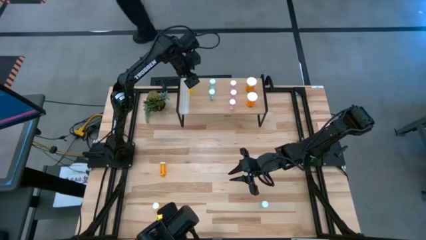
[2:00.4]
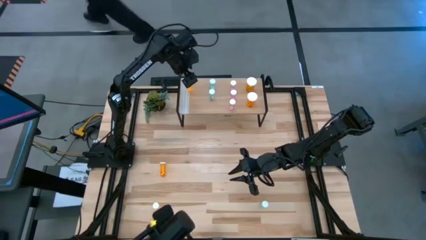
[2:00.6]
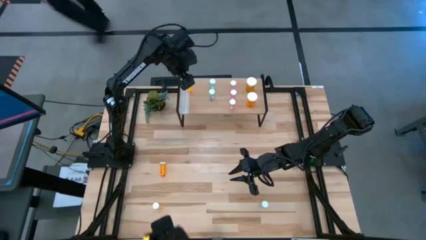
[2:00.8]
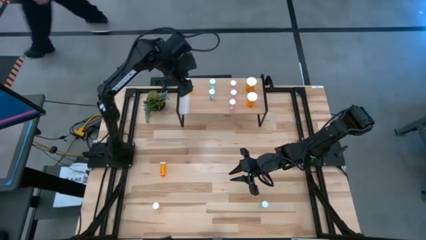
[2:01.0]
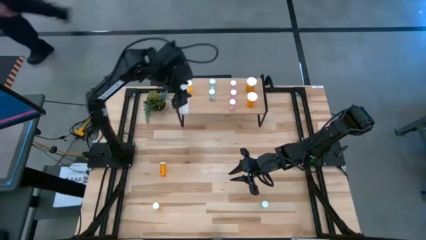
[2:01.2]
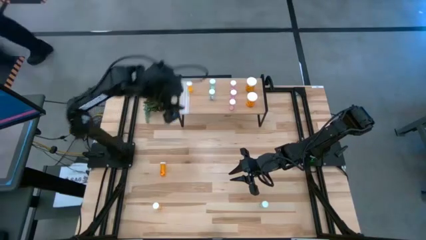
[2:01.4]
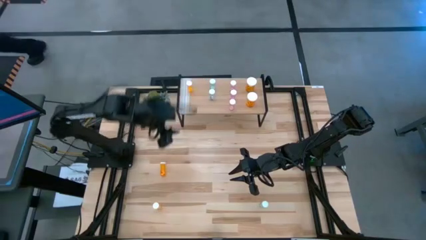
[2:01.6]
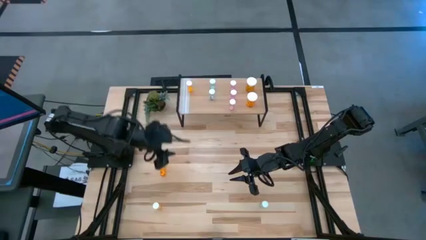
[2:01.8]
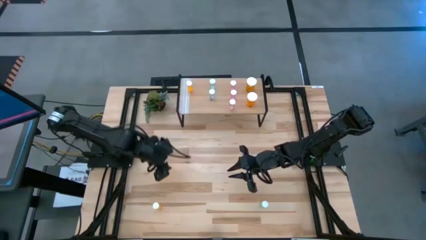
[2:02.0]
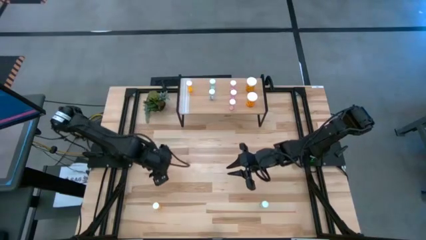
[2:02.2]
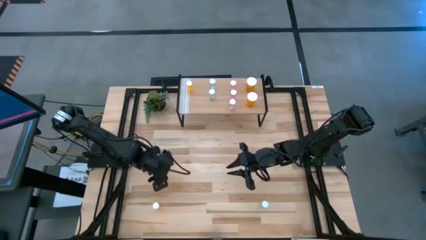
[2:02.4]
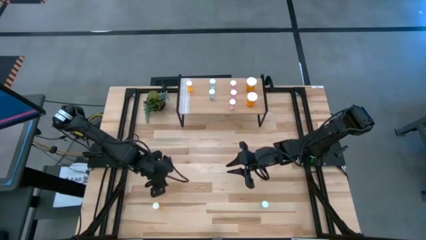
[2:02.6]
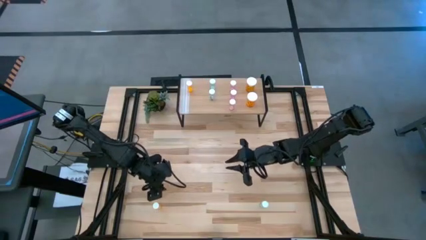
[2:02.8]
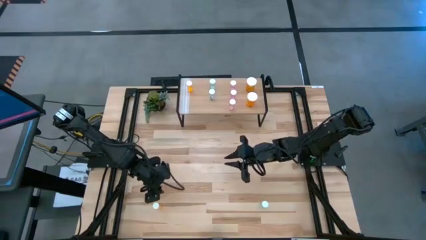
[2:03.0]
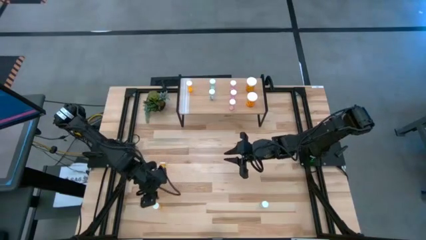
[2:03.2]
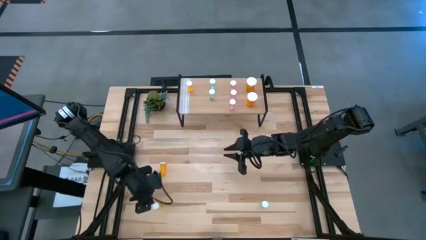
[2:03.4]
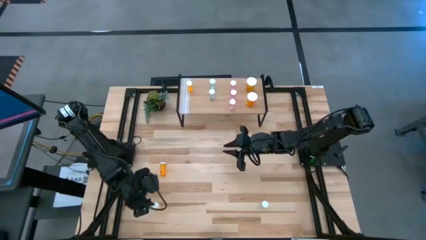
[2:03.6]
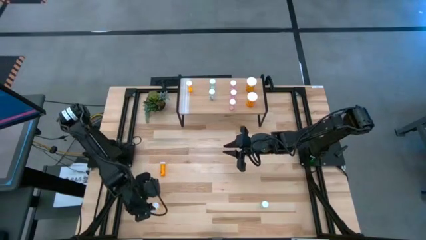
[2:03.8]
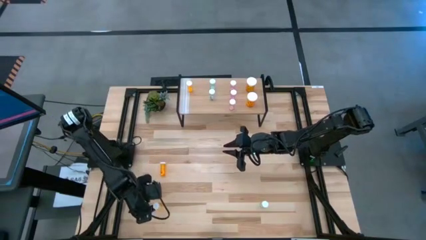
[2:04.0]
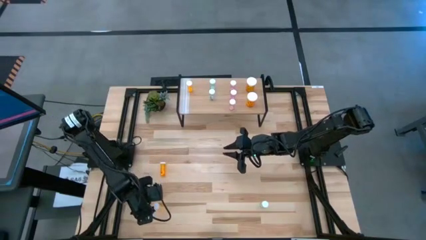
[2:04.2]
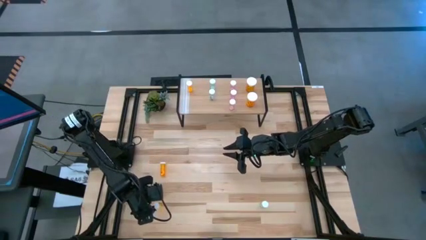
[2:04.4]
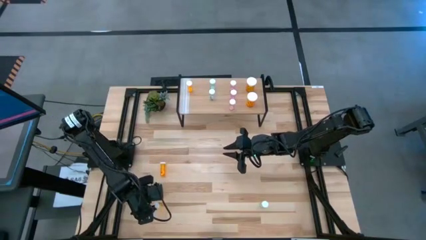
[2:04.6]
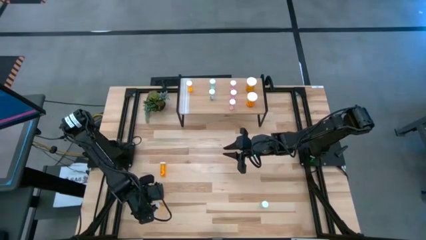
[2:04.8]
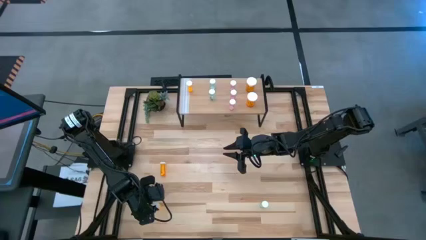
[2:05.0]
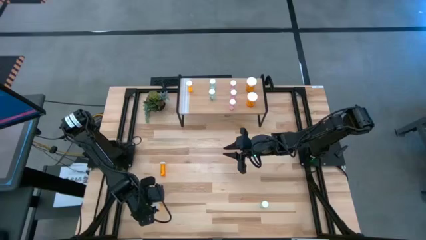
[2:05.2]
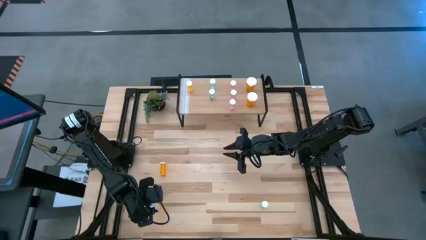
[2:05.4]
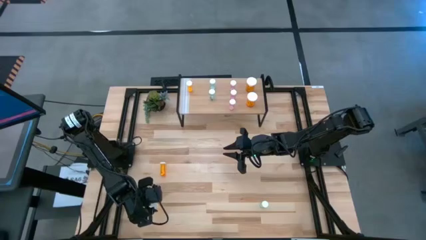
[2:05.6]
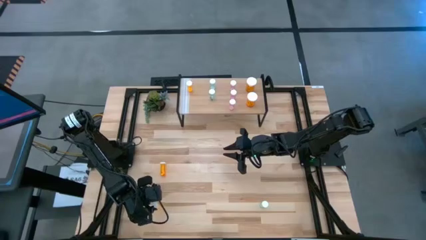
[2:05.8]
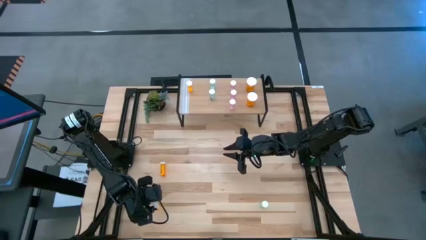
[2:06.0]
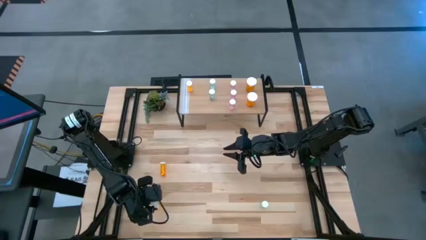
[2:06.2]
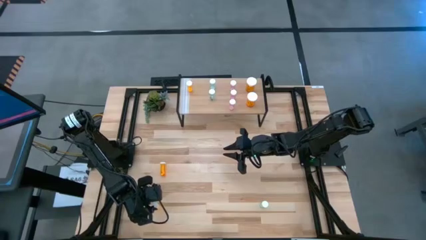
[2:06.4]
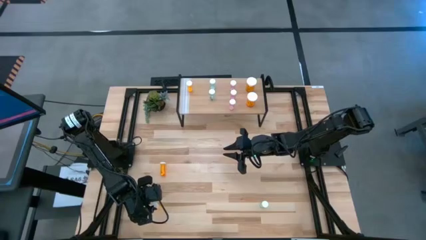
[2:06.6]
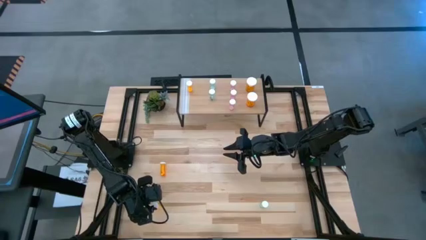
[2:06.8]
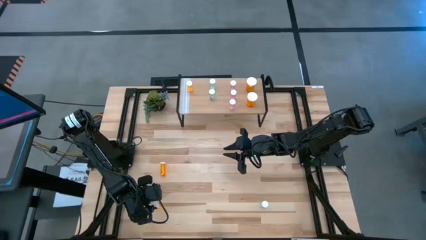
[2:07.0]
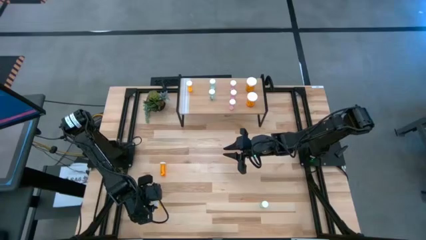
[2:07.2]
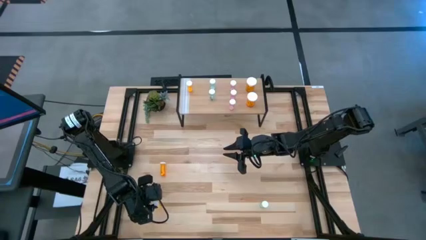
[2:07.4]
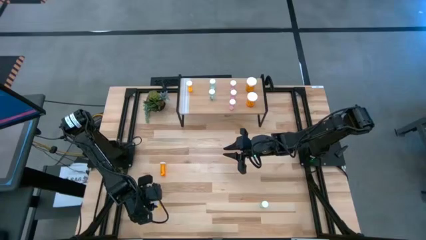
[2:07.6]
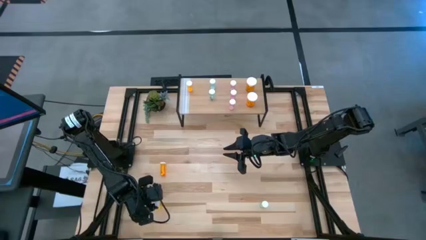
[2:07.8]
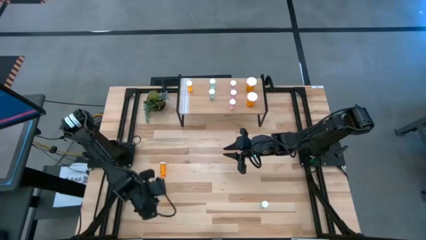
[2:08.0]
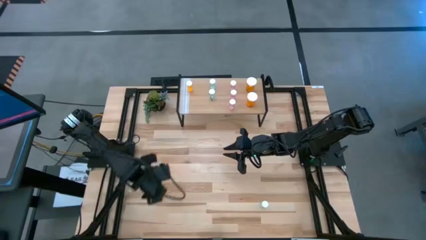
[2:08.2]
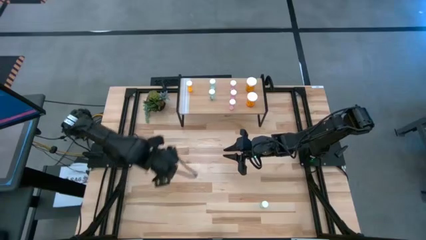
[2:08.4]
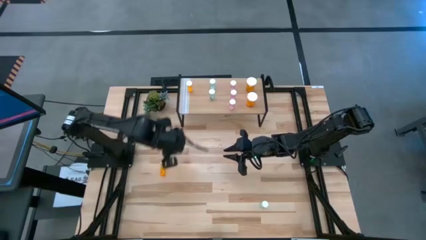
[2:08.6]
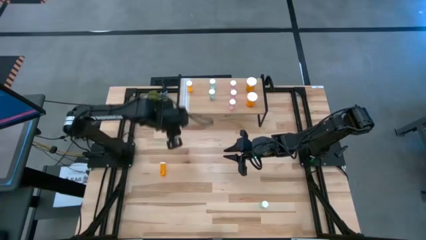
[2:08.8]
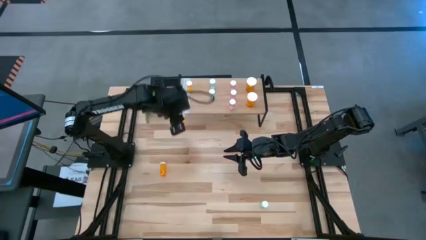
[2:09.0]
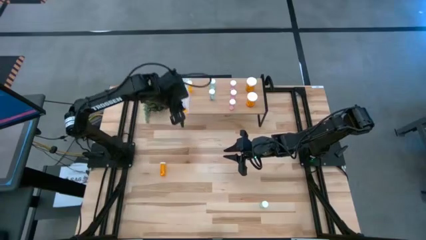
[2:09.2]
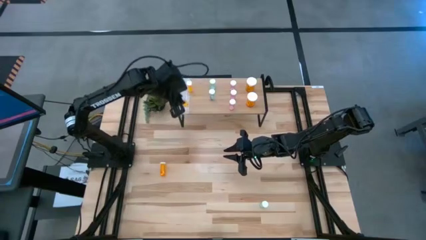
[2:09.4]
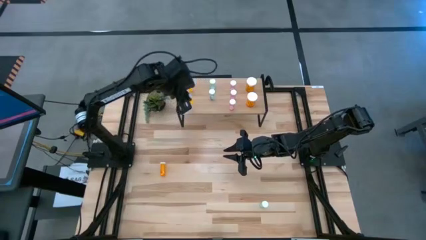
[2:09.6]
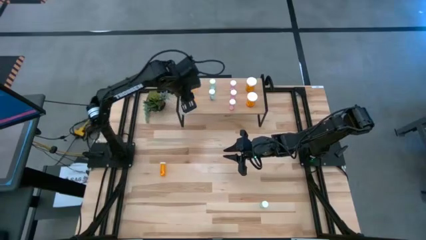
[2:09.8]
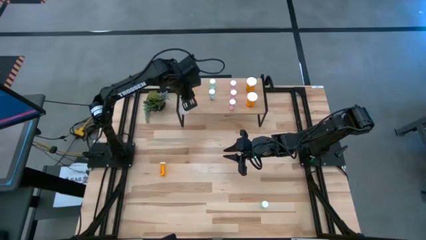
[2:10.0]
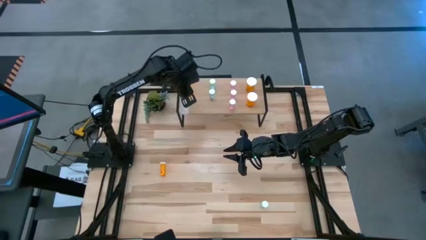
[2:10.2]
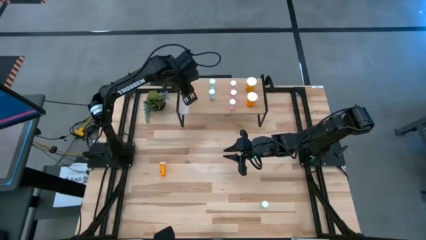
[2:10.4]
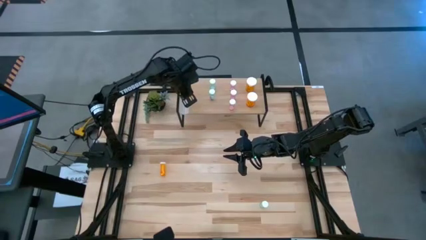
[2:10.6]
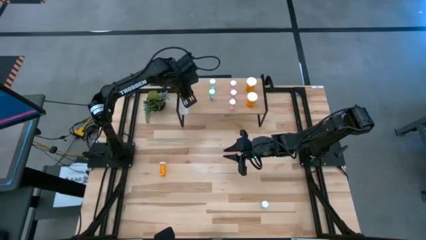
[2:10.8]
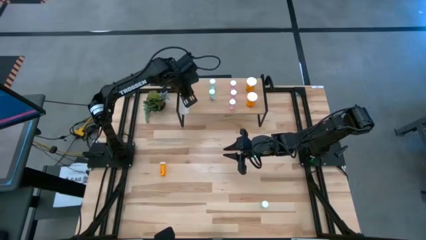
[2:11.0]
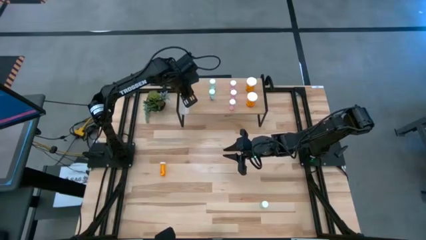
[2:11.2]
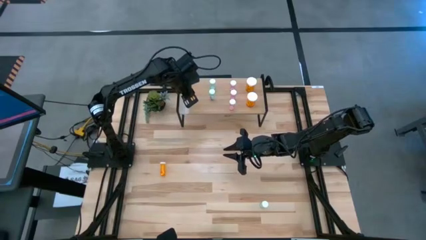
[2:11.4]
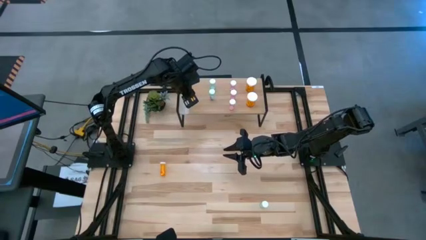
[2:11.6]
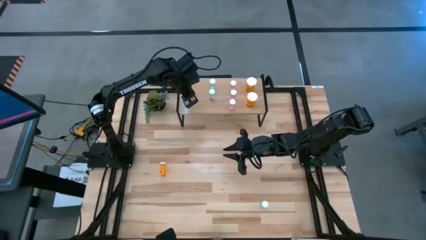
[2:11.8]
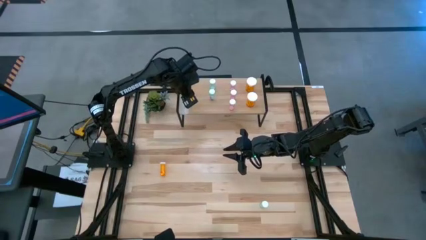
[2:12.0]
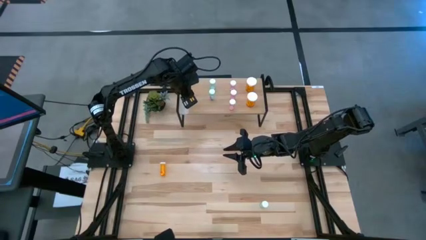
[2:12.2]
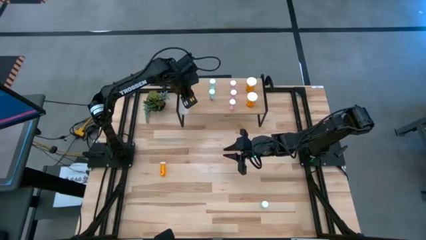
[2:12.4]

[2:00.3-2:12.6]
Task: Pick and place medicine bottles onto shelf by color
Put the bottom small orange pill bottle on the shelf aligned with the other small orange pill bottle
